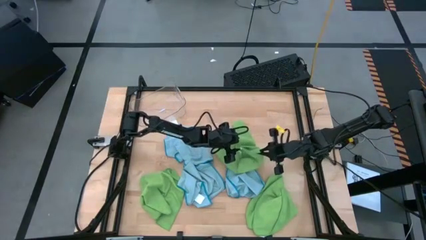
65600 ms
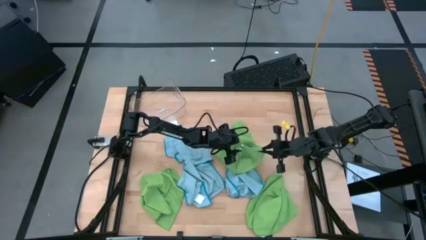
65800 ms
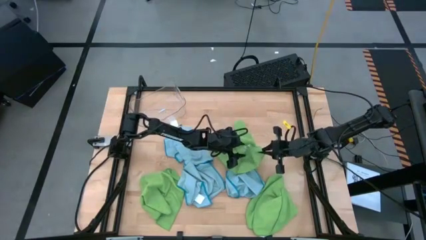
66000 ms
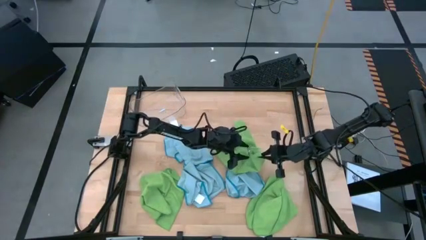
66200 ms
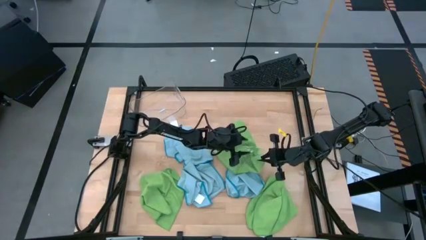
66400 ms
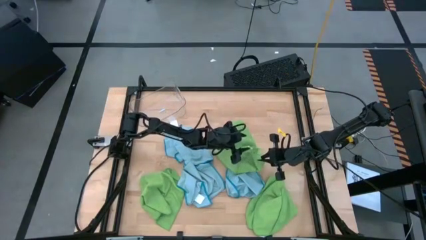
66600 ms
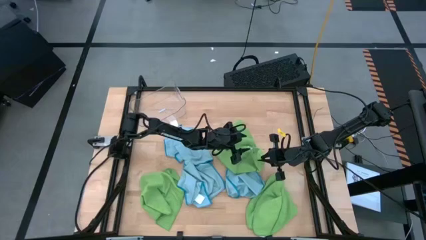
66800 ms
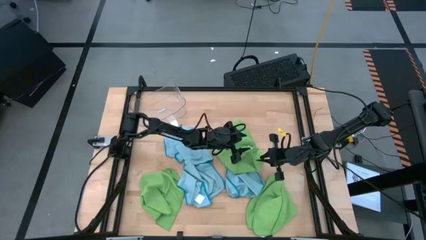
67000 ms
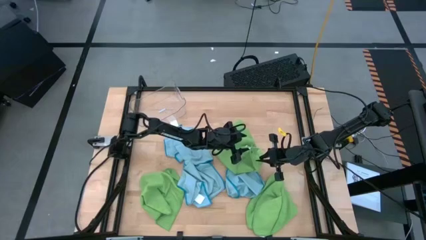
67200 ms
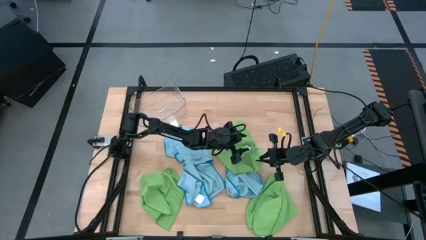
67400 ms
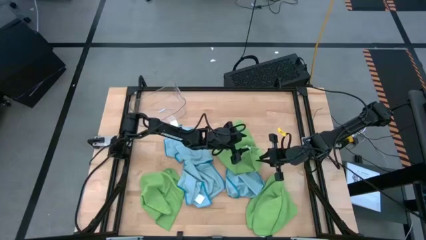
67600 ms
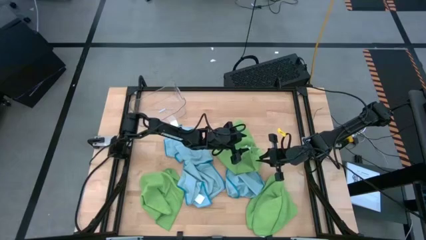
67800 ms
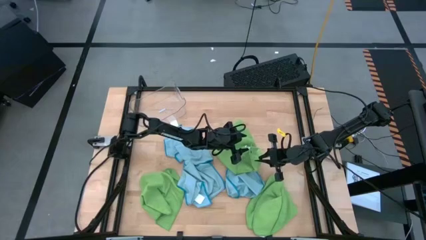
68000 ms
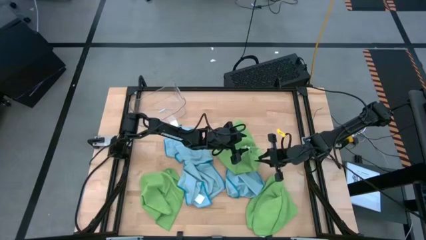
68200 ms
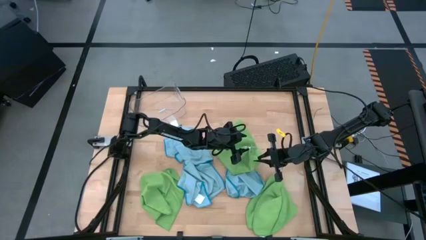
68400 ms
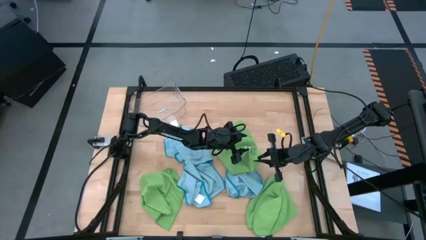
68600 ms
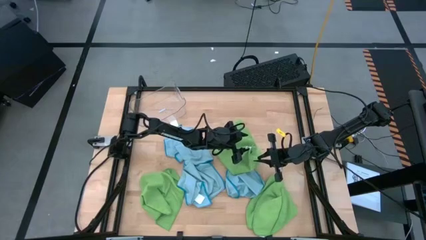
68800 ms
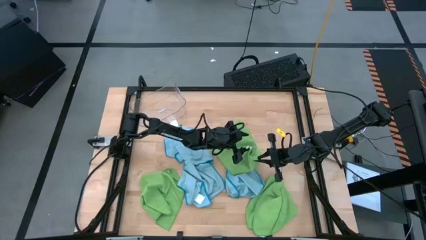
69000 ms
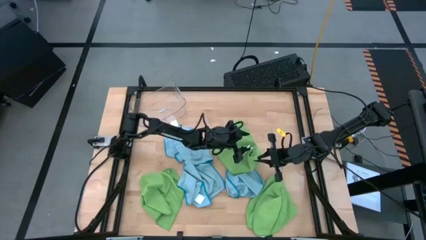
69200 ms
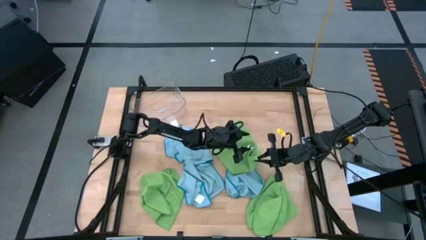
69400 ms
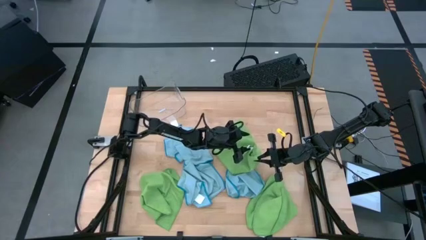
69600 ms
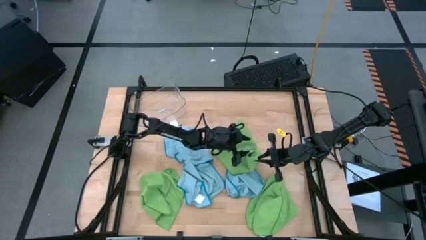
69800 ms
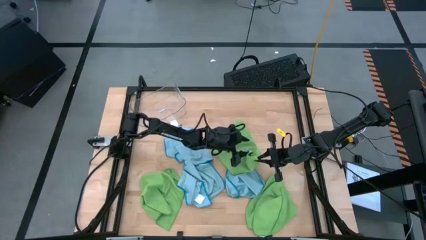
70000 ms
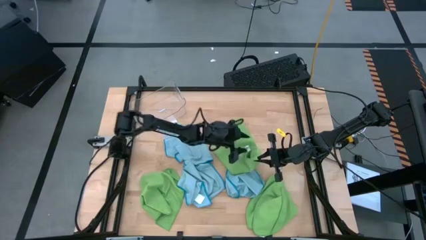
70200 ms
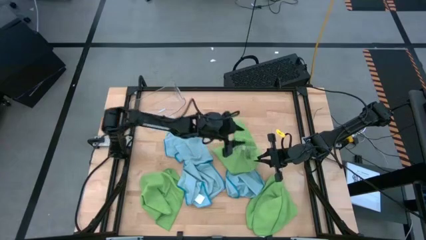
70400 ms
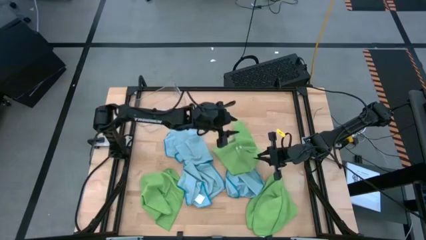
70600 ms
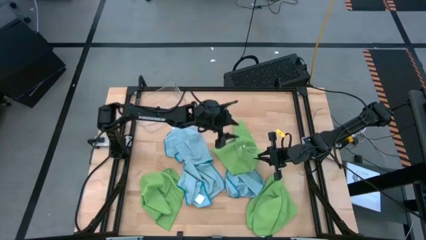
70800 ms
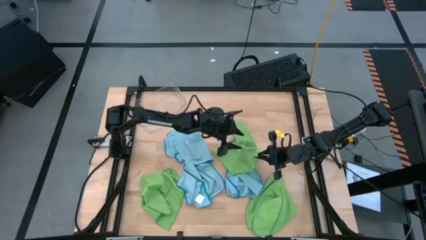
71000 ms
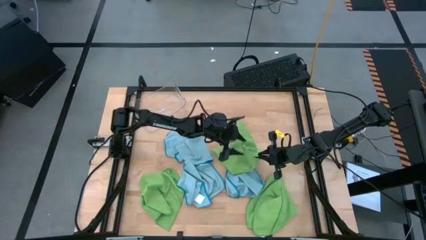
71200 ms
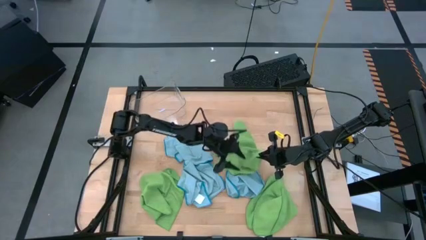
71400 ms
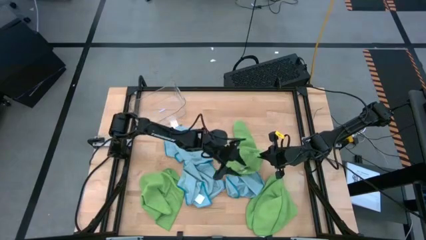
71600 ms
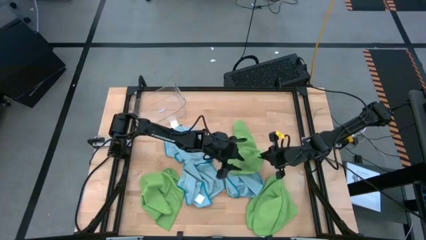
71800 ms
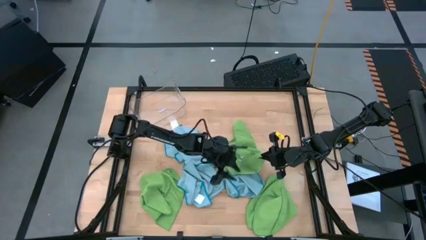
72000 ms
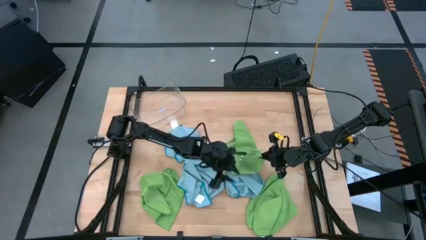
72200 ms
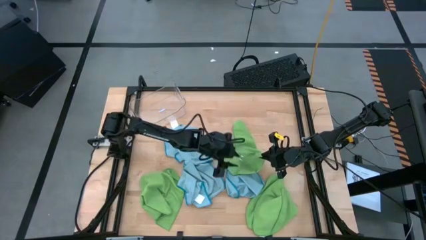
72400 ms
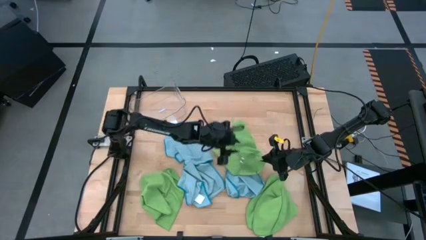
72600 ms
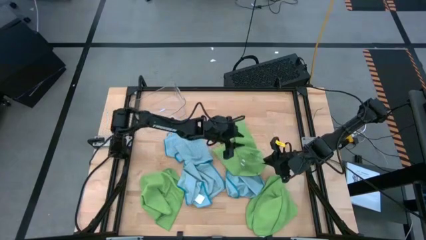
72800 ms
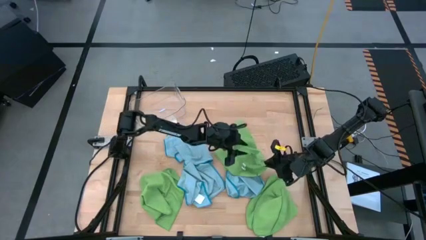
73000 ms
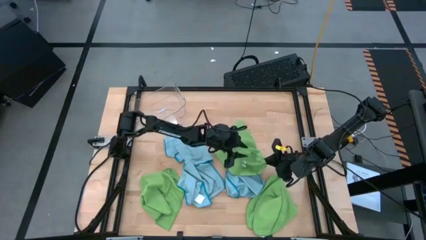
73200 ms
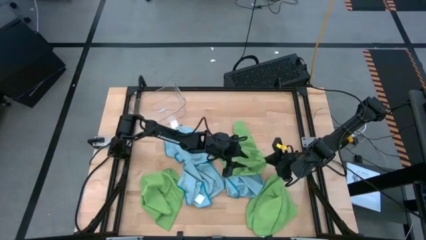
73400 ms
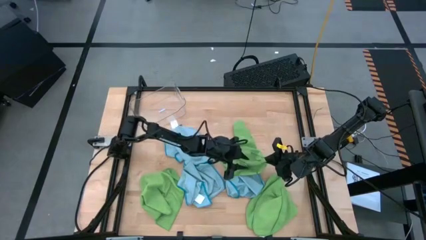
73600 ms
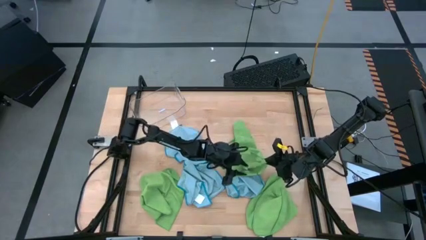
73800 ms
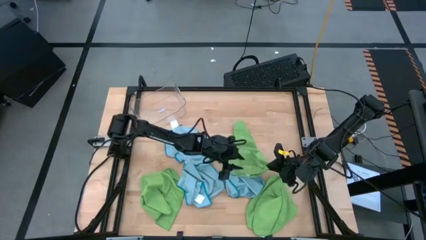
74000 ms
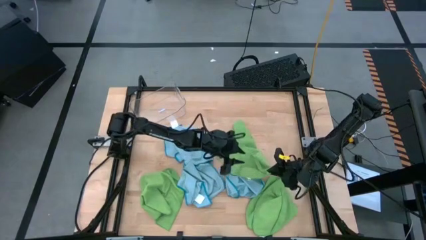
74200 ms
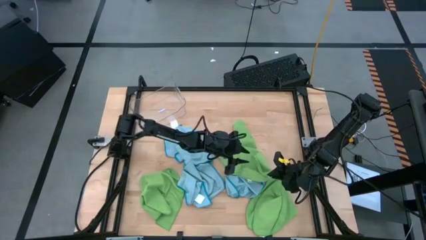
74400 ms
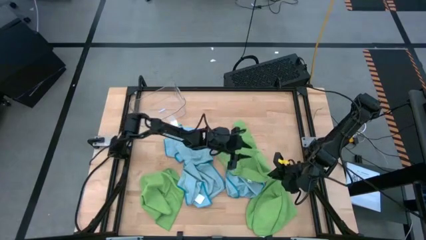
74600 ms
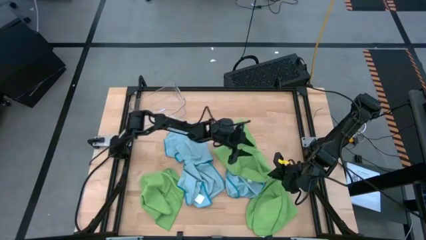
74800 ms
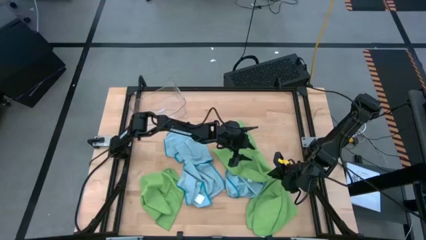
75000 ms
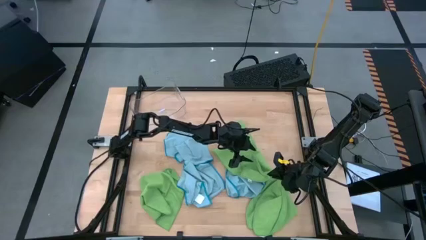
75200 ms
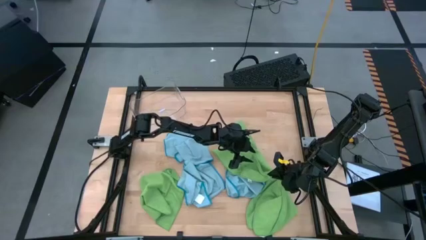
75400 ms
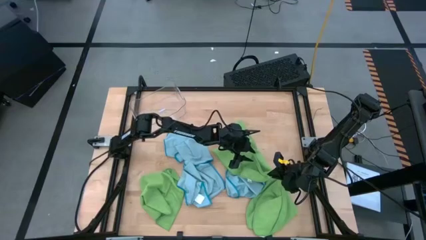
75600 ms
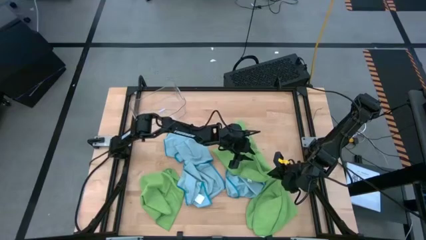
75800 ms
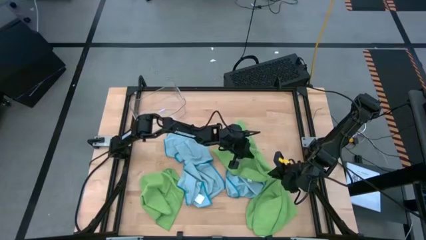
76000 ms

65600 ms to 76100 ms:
Task: Fold microfiber towels
Fold the top right green microfiber cloth

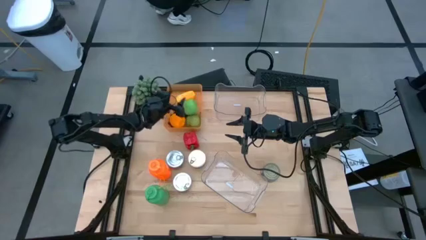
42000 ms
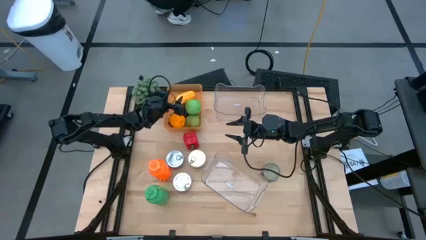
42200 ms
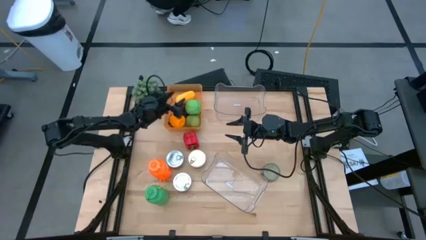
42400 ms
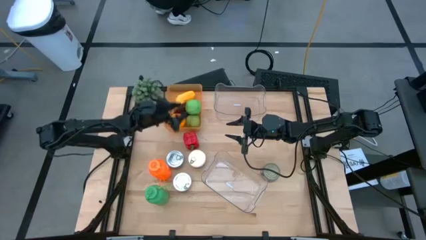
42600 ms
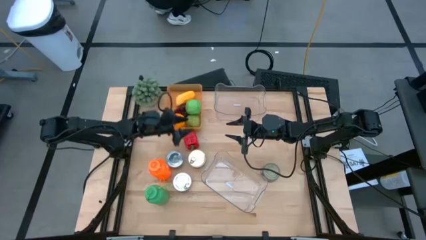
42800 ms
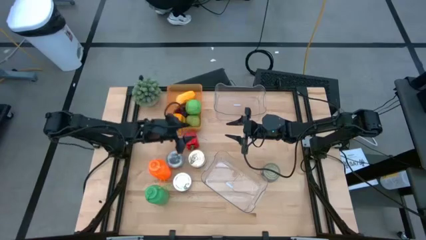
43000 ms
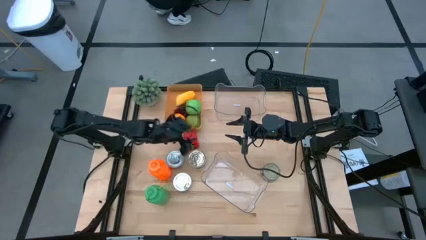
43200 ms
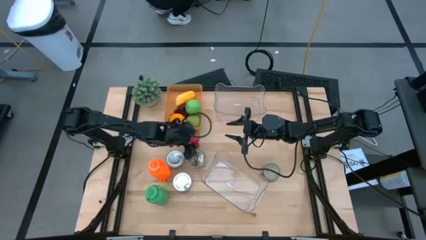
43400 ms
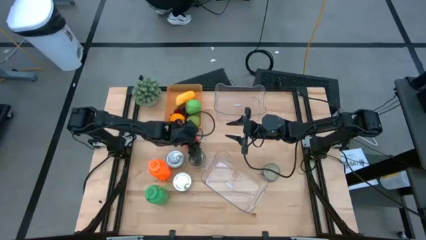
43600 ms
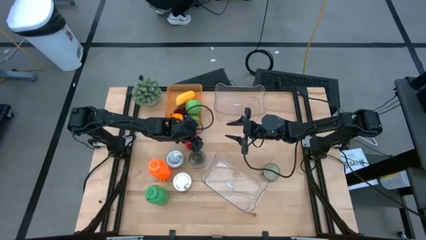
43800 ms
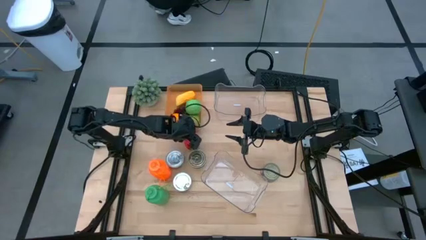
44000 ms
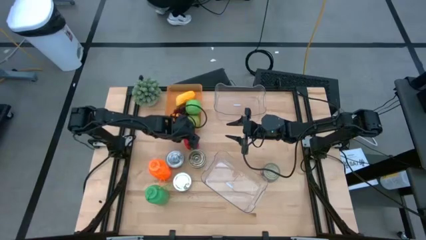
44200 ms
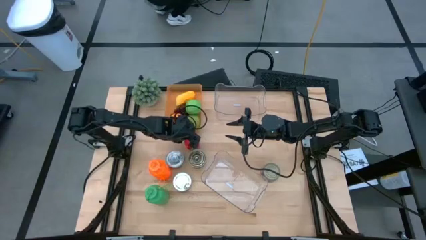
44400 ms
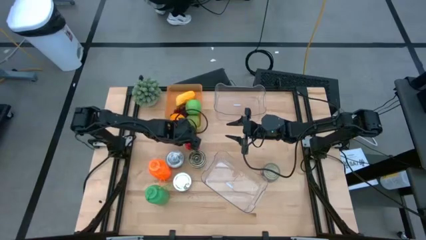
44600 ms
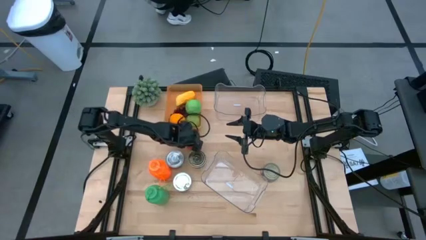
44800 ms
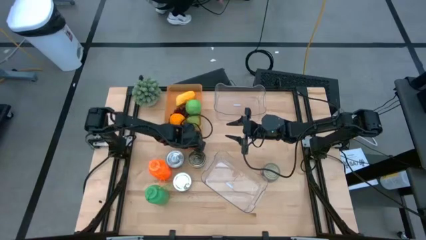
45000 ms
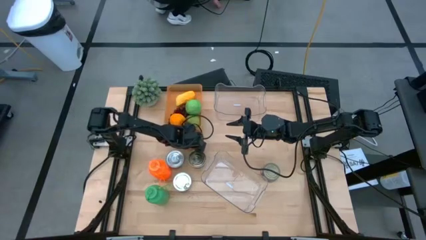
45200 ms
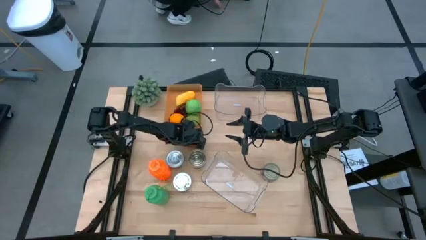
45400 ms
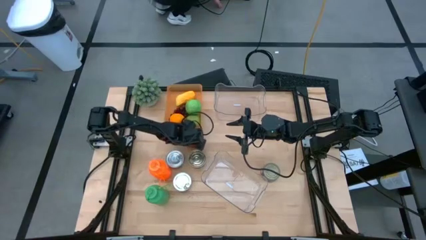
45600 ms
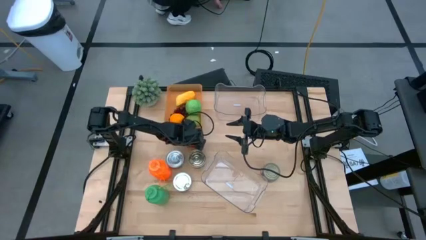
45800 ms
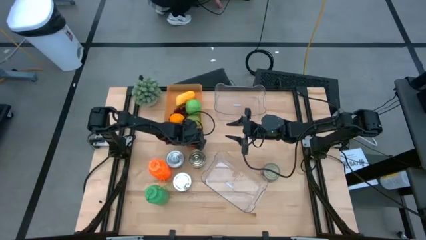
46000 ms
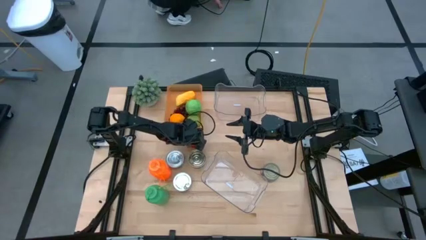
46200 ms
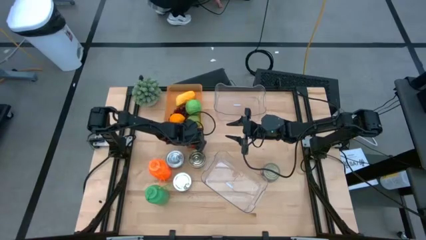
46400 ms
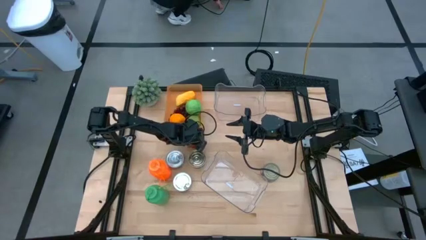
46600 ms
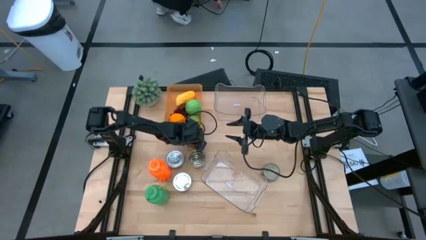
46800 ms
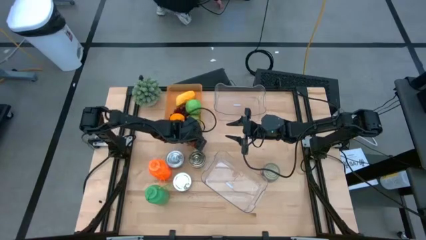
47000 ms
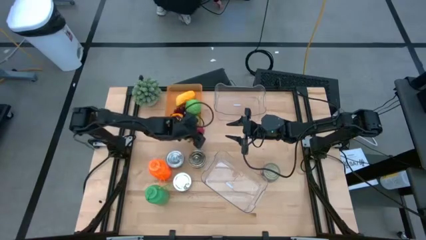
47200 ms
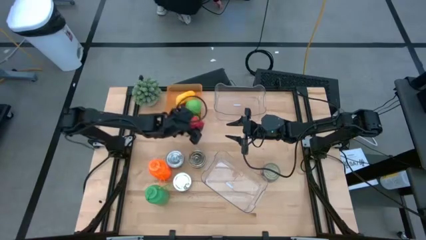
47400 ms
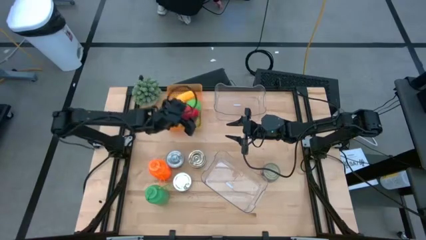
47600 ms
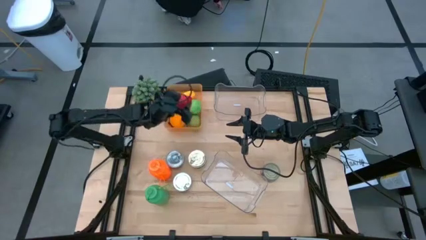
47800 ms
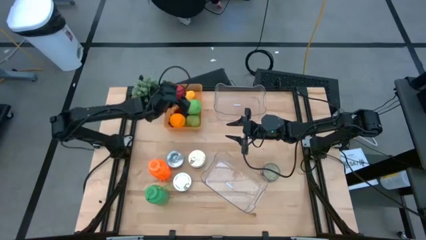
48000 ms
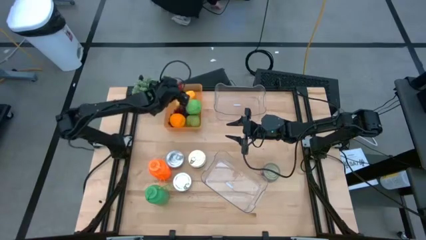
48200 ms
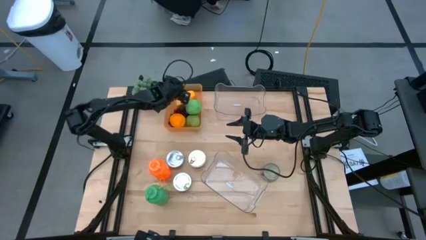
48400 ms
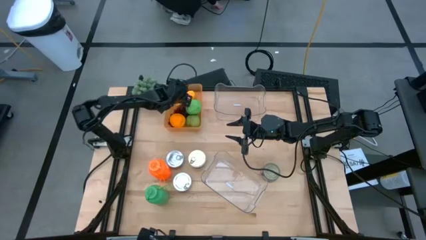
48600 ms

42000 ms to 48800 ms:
Task: Pick & Place Food Item
Put the bell pepper into the orange bin
